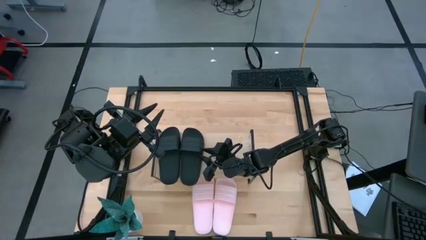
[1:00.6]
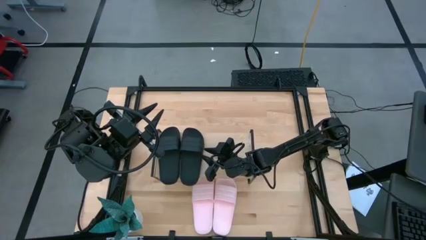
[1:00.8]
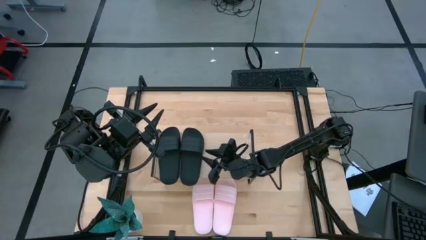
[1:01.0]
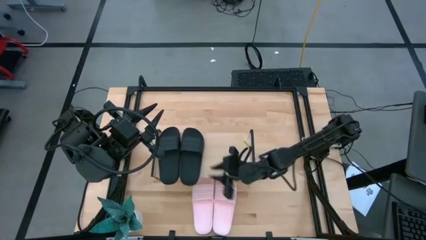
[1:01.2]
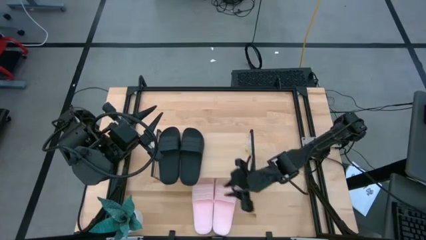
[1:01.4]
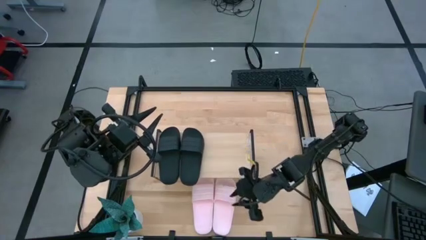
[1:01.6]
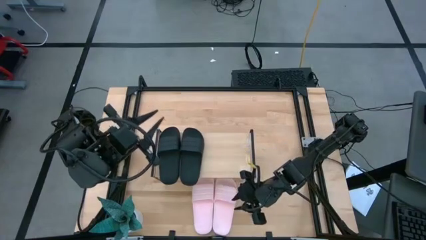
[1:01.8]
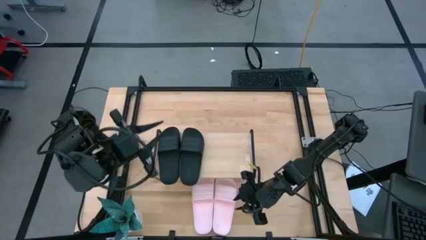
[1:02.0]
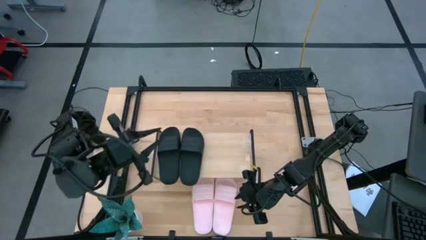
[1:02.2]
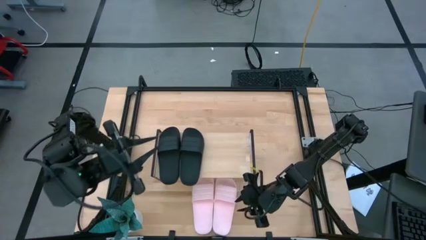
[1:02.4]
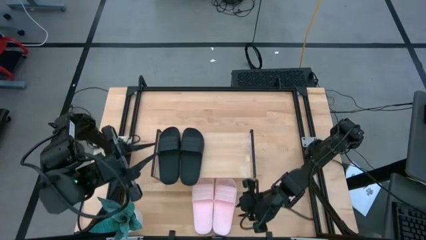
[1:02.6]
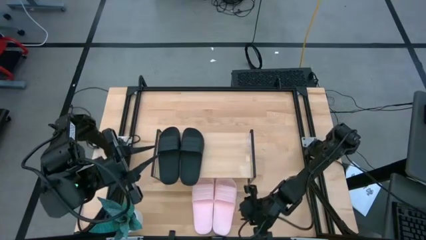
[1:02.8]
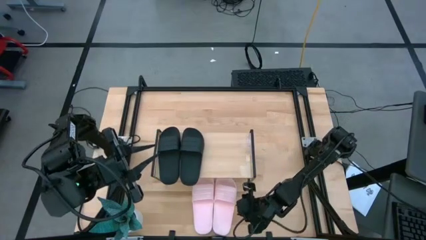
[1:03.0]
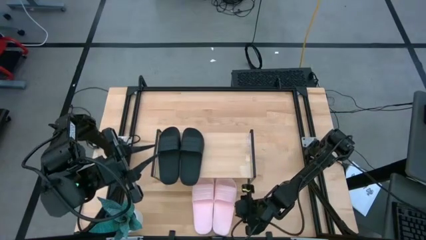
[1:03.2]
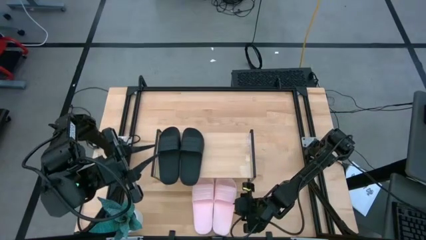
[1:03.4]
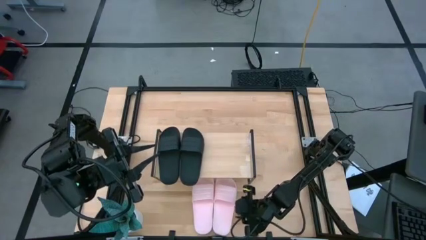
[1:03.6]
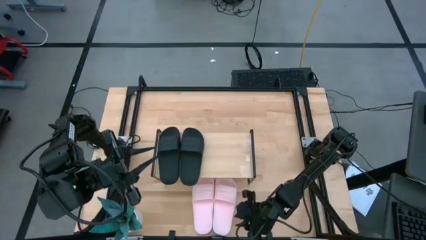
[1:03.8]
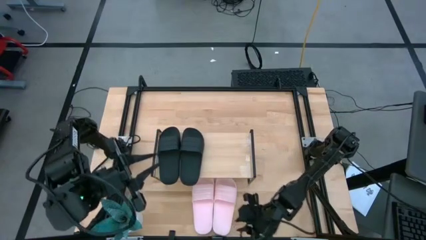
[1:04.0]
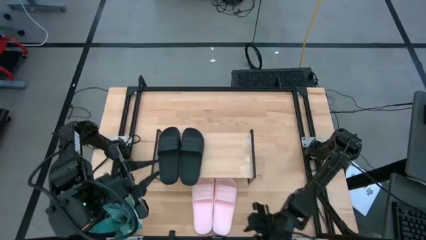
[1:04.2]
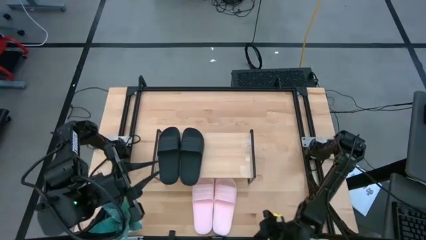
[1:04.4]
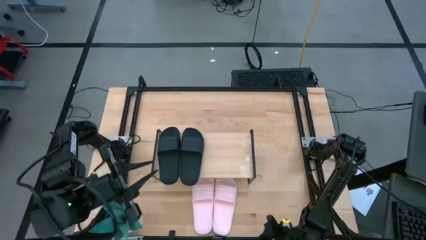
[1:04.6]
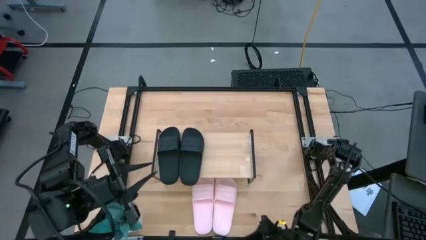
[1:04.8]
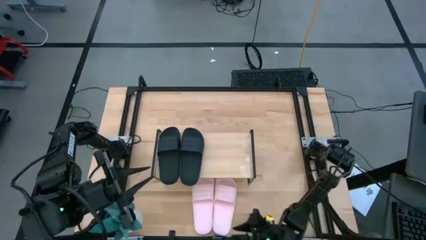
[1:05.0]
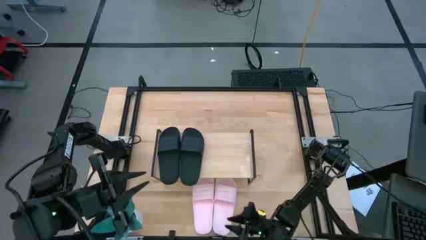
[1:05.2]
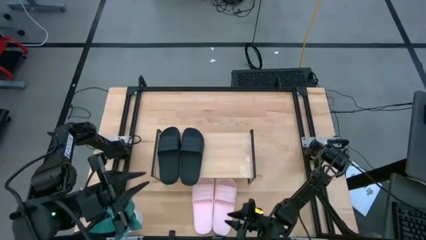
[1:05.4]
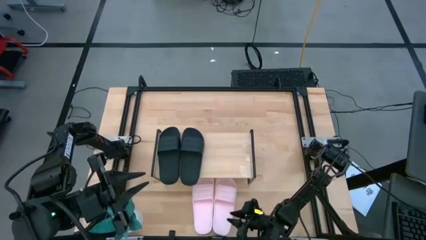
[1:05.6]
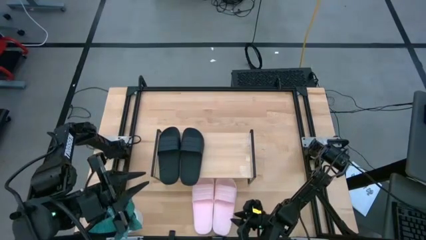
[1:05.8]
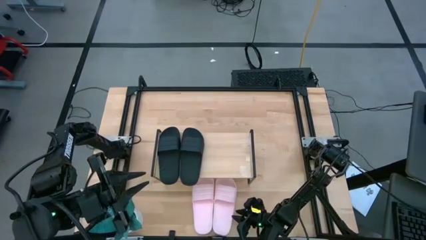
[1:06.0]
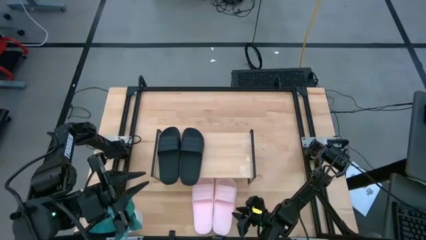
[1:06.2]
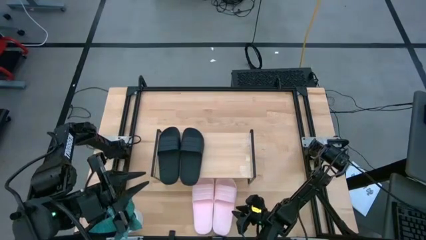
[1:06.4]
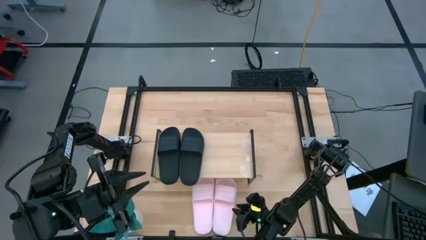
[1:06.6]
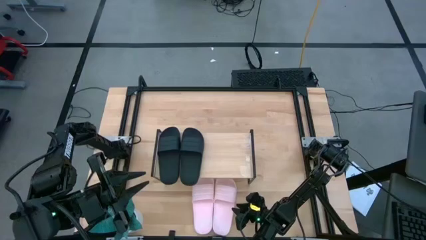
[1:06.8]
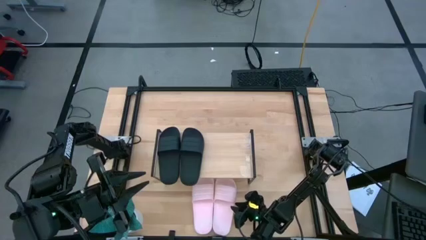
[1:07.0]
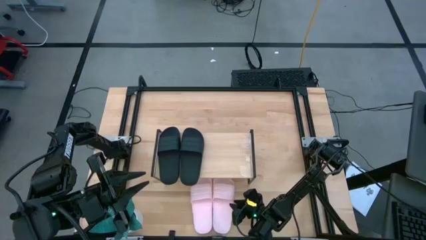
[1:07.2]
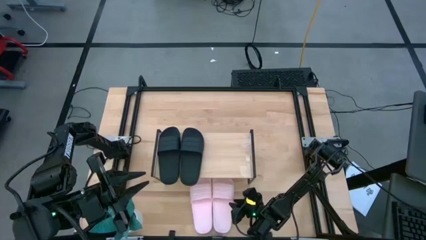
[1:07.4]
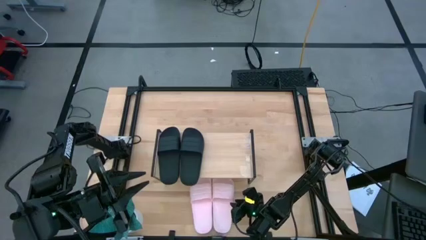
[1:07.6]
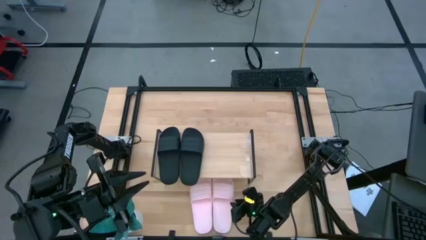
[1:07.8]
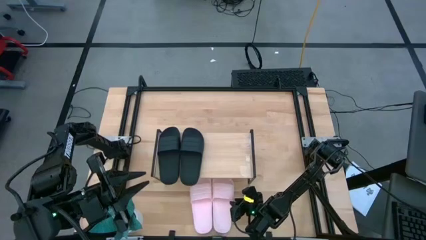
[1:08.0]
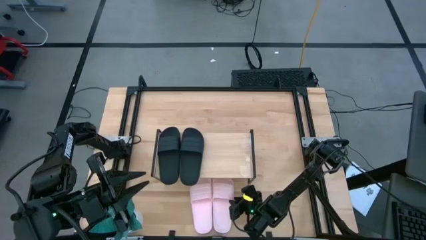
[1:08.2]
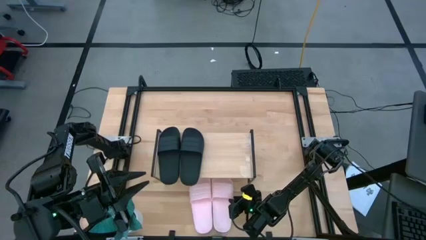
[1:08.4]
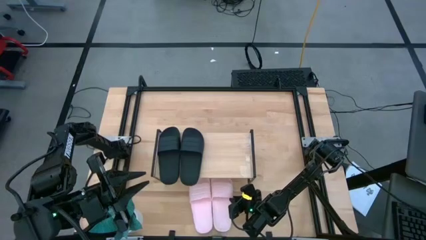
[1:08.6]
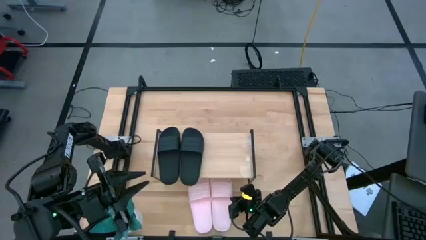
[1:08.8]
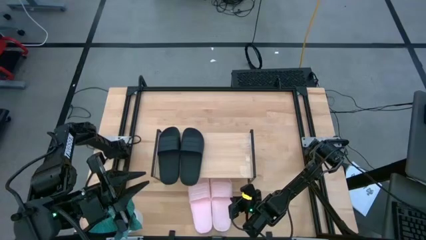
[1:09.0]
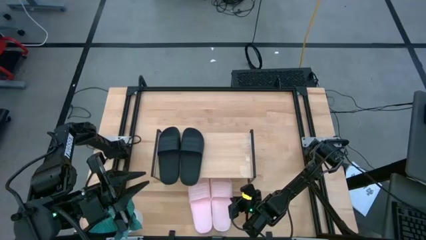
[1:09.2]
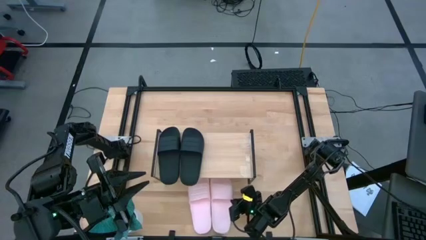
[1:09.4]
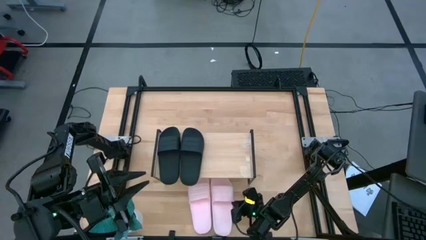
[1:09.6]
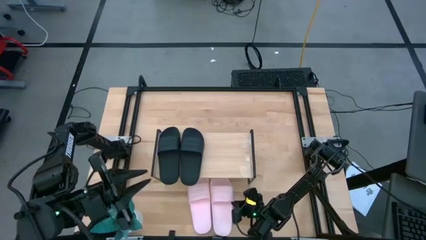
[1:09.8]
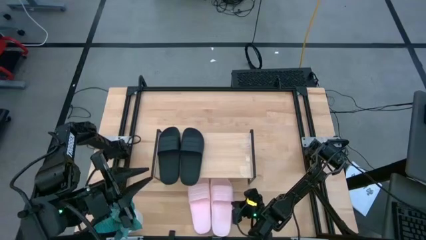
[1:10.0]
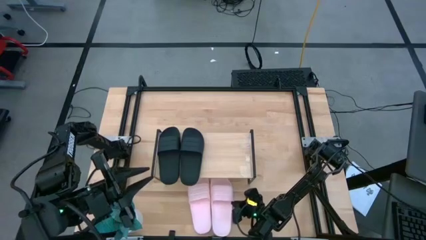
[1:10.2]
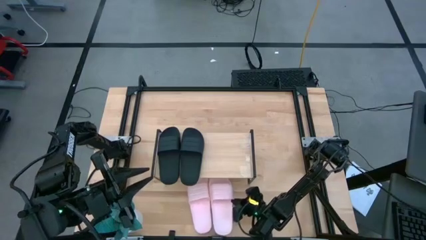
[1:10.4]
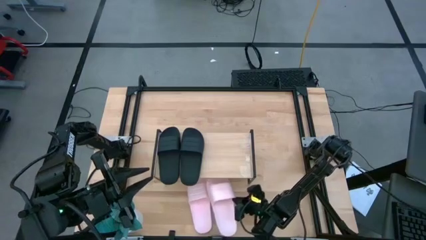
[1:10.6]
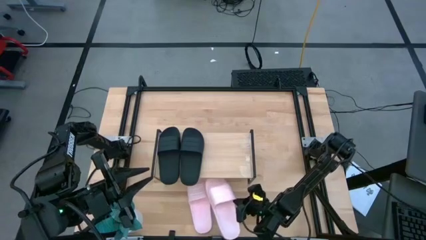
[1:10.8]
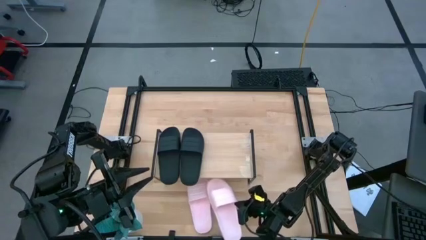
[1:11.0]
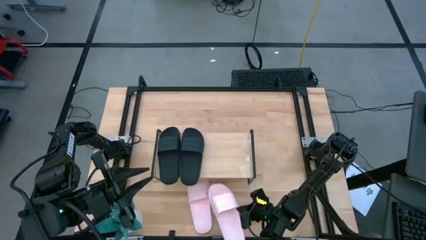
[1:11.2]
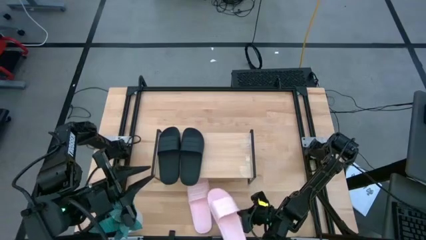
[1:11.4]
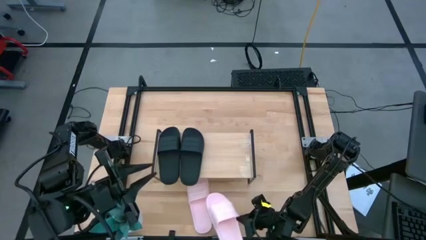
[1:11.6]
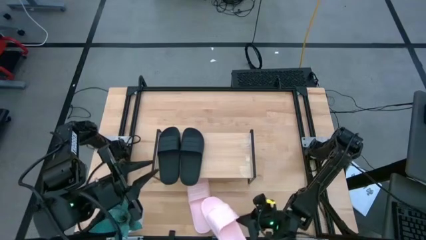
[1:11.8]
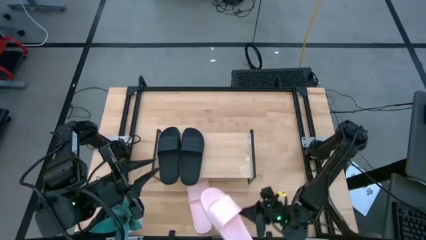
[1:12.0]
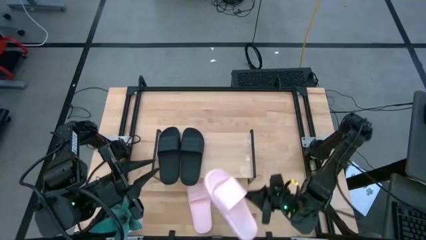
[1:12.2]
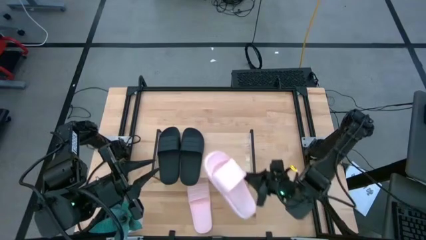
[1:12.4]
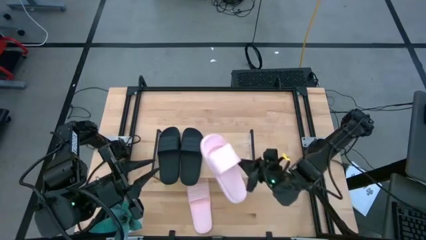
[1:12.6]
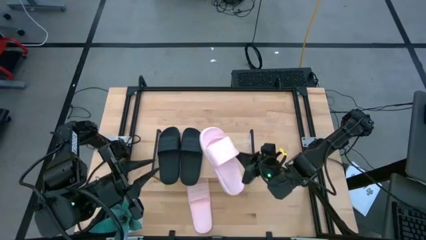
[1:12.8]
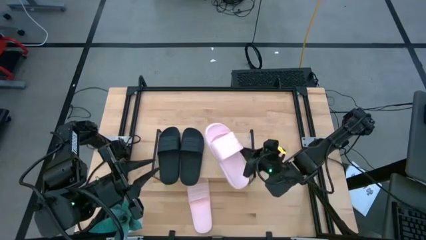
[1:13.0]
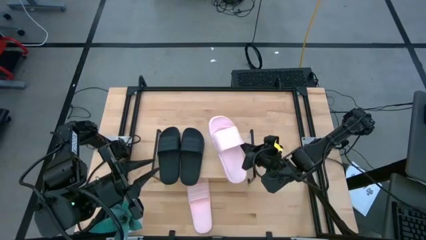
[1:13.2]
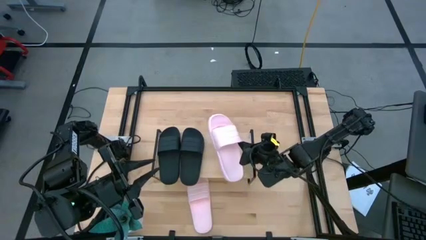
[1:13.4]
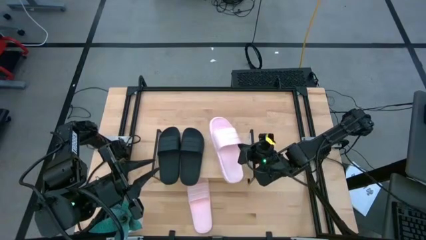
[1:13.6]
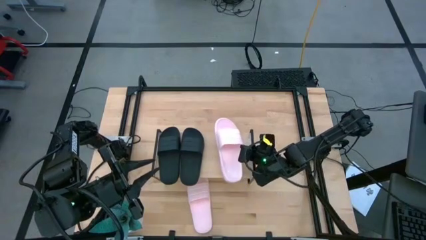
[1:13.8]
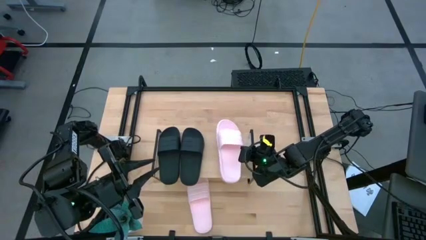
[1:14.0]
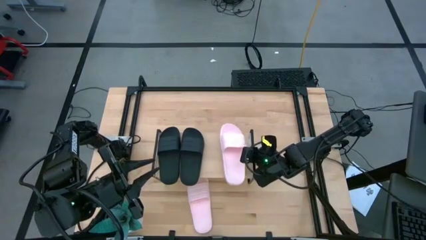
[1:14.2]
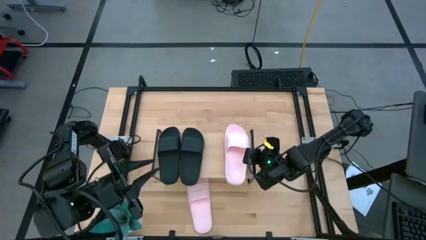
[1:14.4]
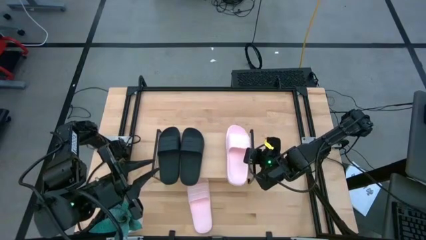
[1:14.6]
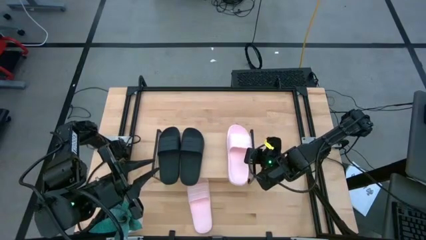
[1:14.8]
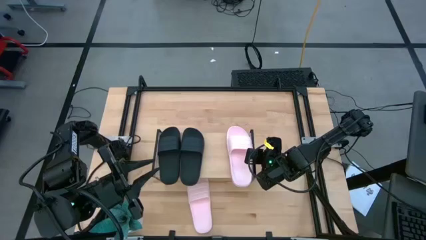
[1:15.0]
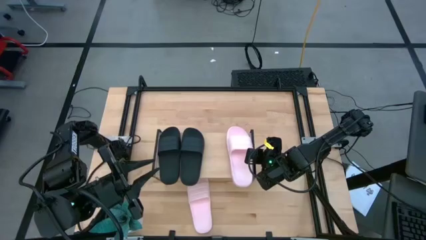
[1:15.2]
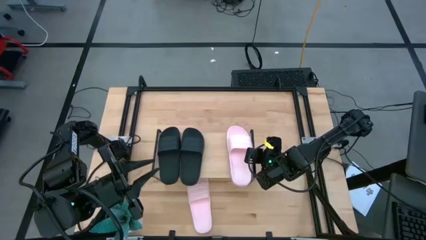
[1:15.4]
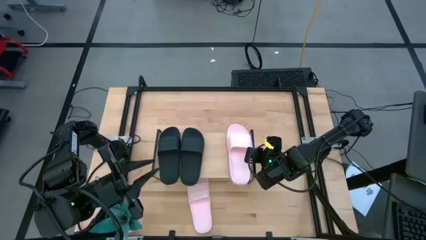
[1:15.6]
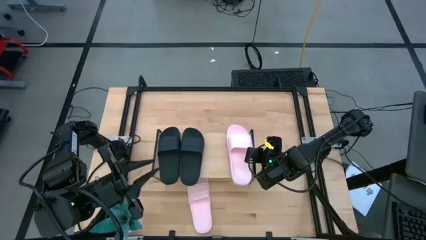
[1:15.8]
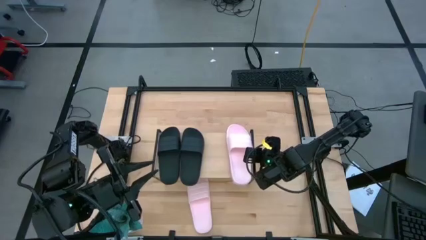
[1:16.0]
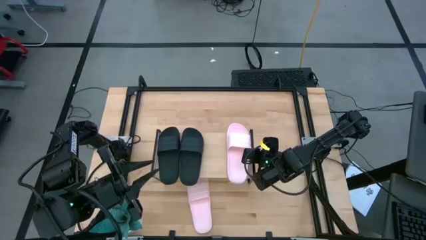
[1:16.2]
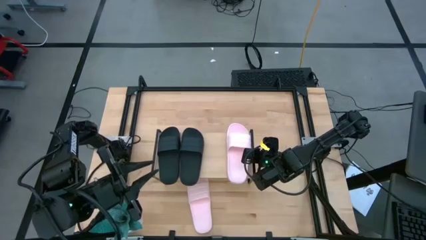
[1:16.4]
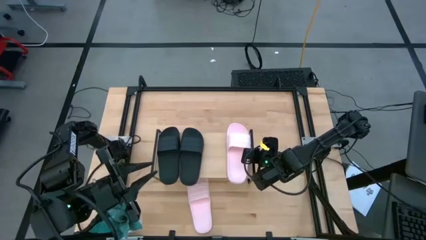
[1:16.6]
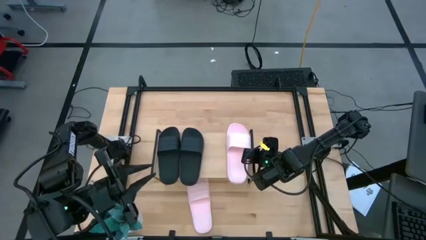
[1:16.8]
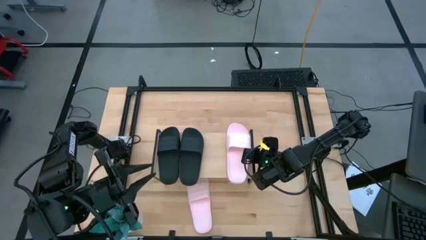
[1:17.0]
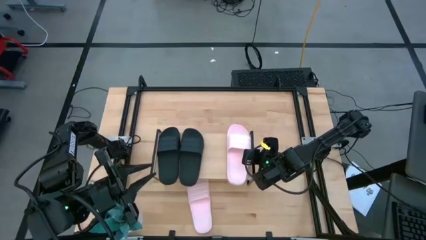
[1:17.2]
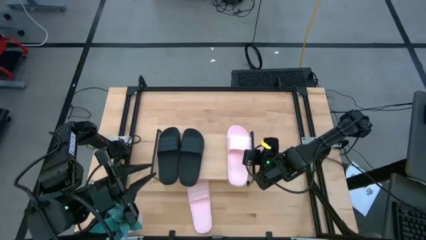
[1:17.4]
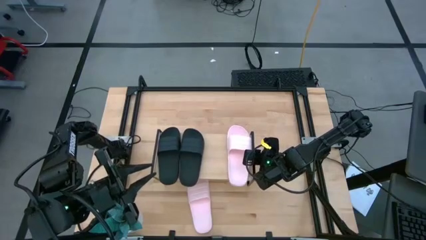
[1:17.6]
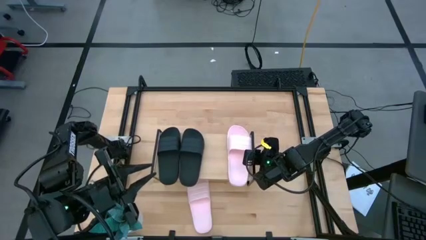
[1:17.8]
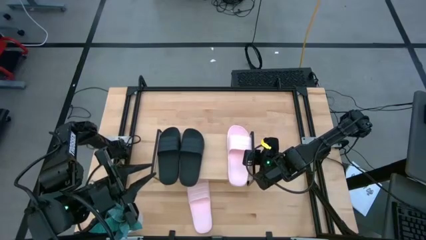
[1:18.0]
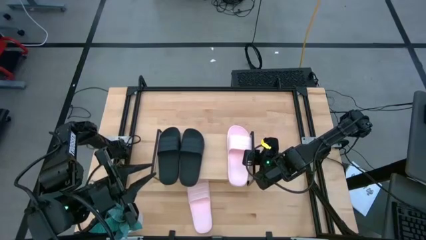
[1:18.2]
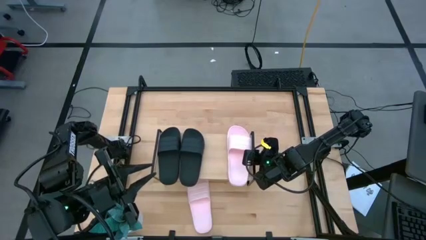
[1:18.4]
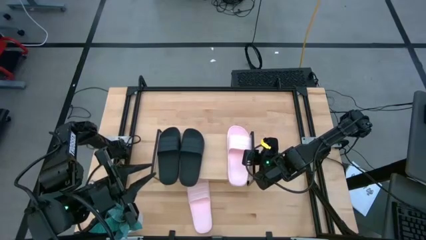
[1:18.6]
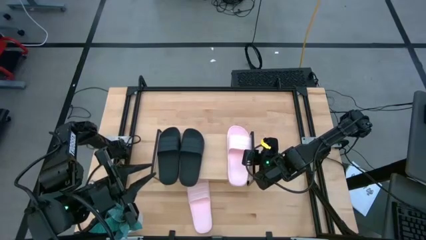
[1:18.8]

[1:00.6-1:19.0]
Task: Pick and place slides into the shelf
Put the right pink slide on the shelf
